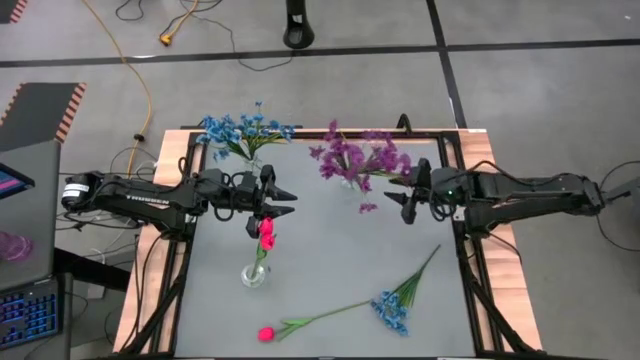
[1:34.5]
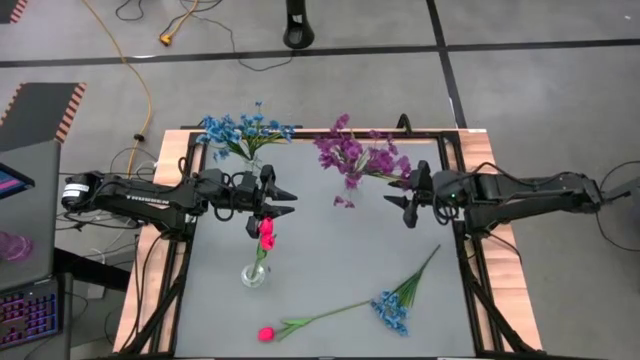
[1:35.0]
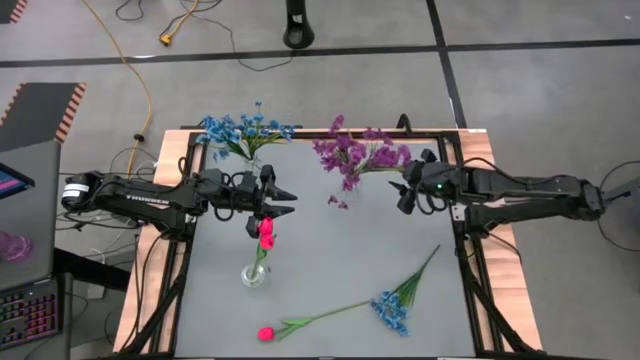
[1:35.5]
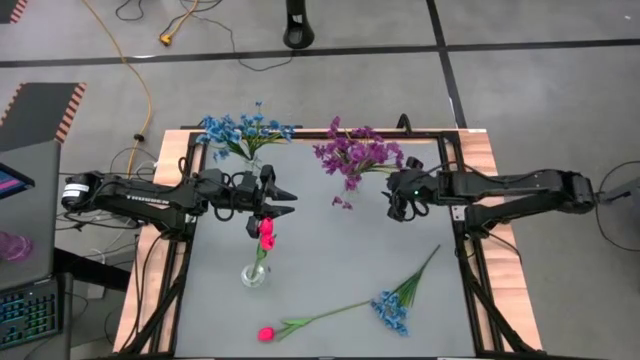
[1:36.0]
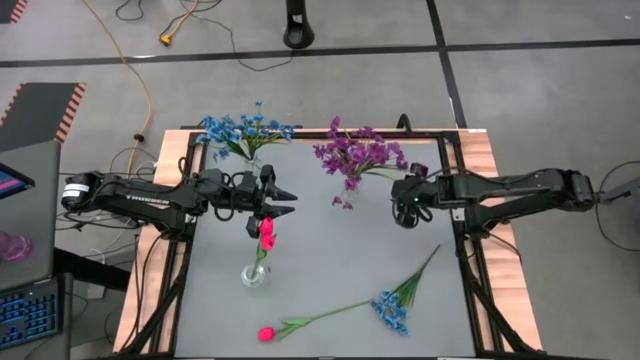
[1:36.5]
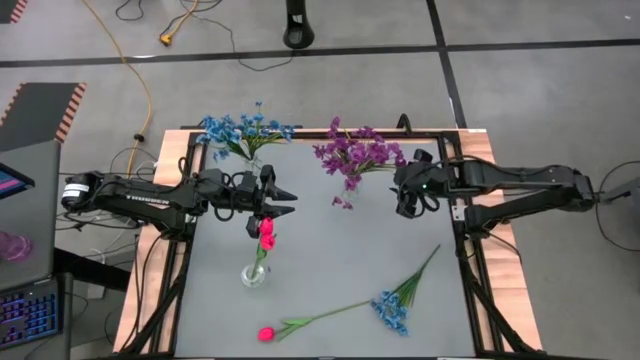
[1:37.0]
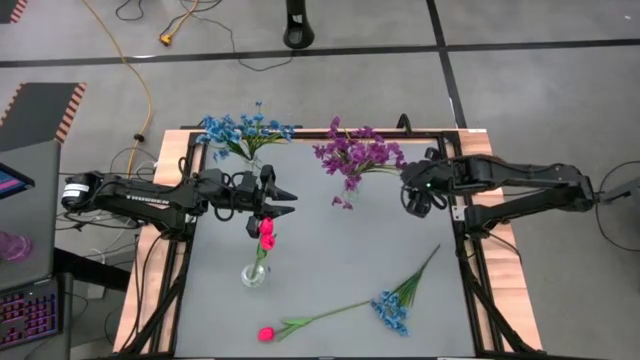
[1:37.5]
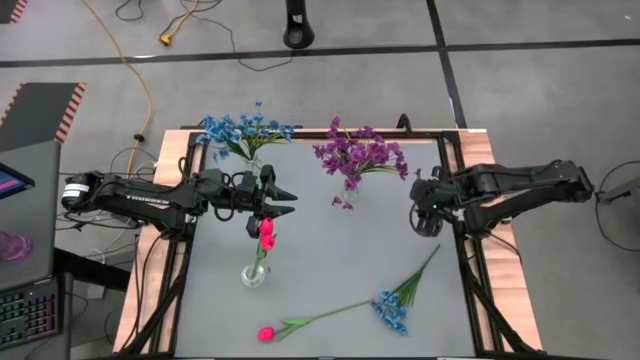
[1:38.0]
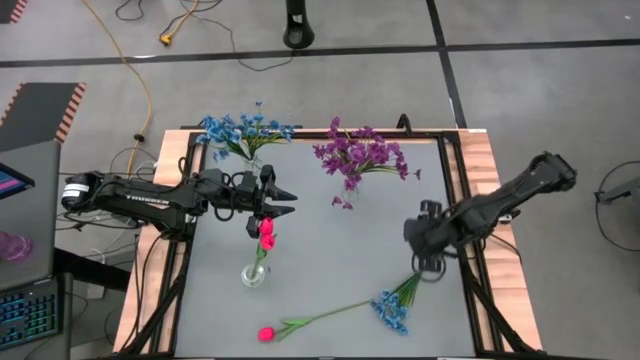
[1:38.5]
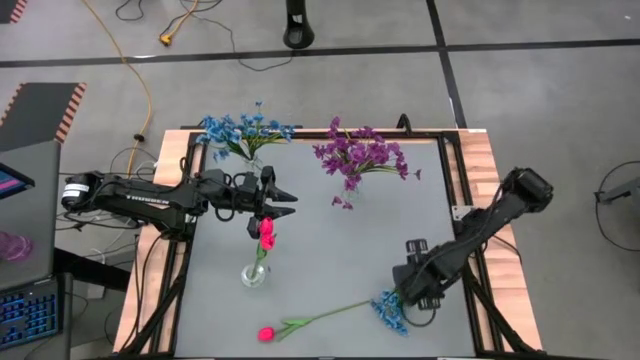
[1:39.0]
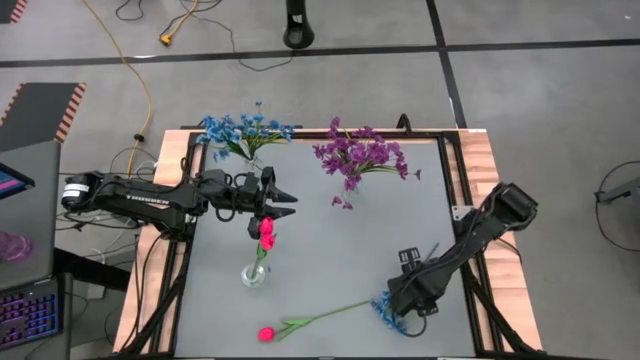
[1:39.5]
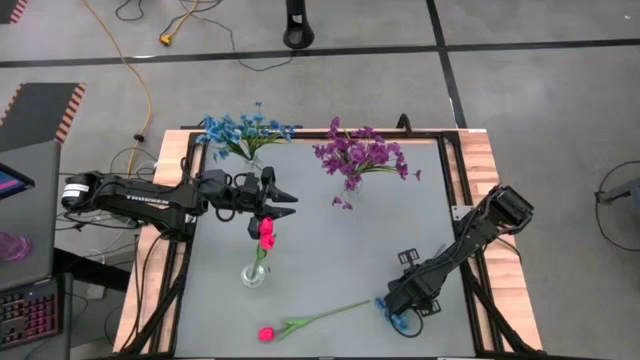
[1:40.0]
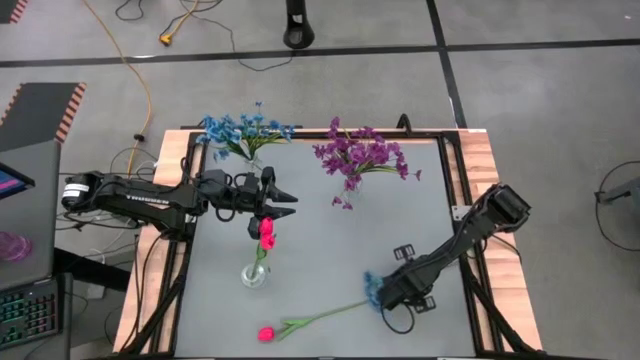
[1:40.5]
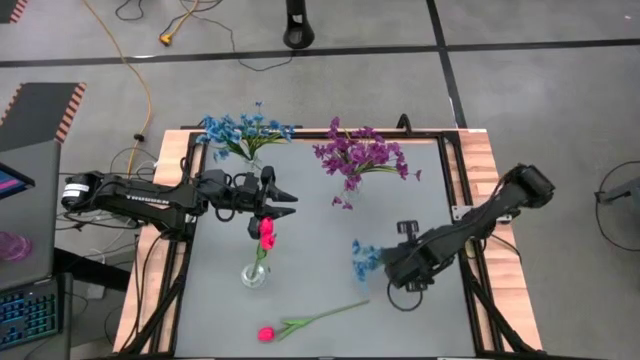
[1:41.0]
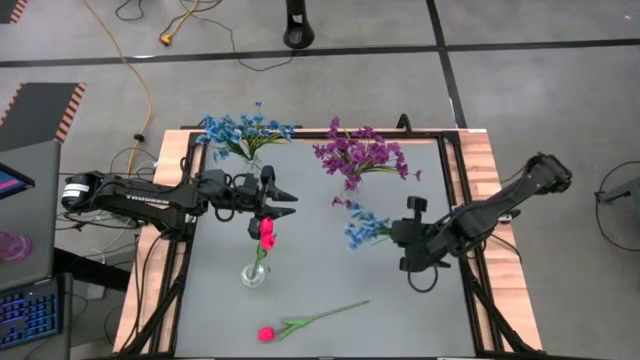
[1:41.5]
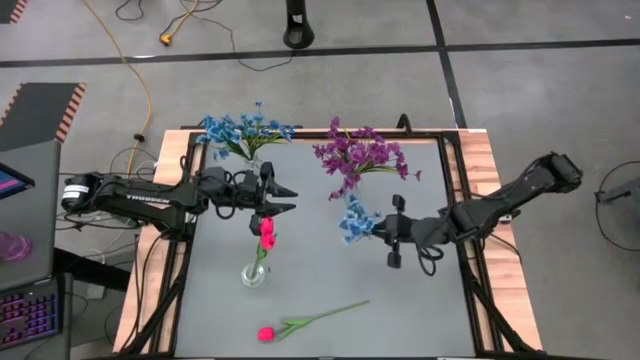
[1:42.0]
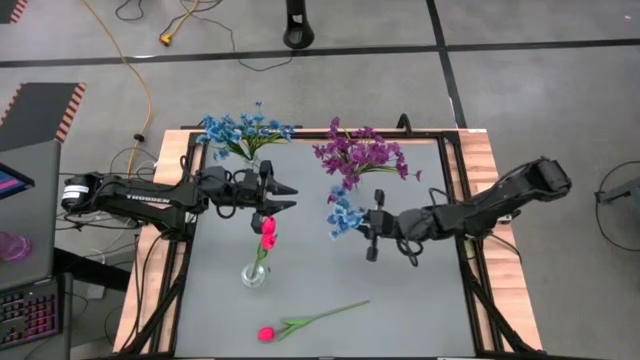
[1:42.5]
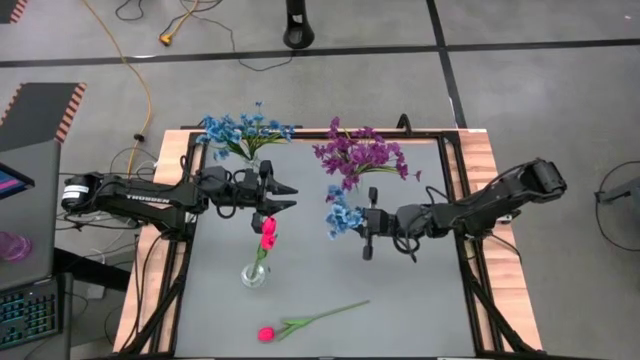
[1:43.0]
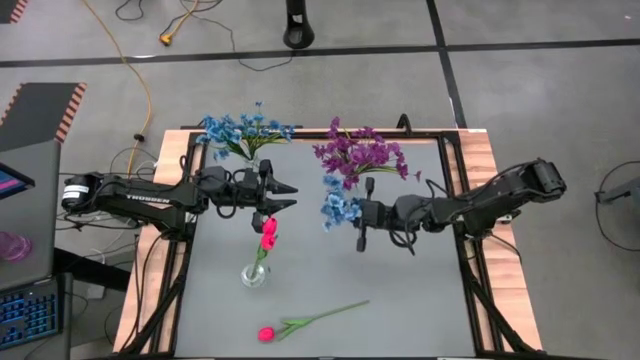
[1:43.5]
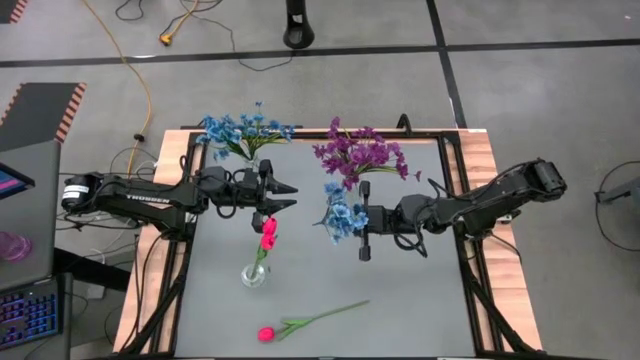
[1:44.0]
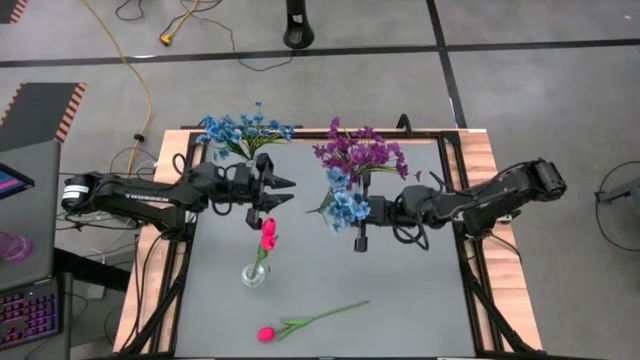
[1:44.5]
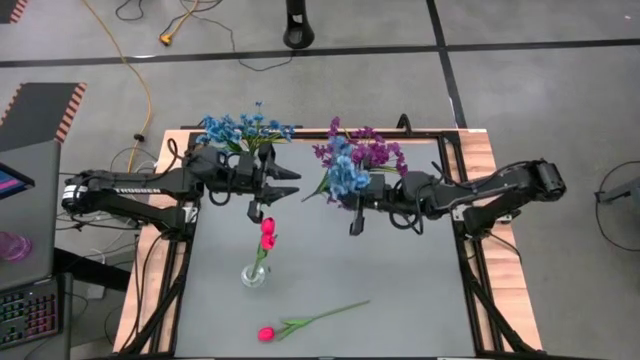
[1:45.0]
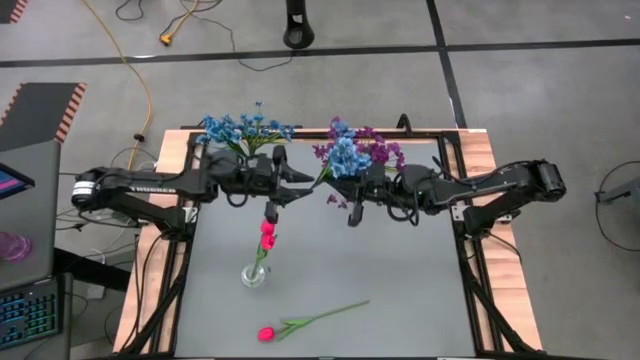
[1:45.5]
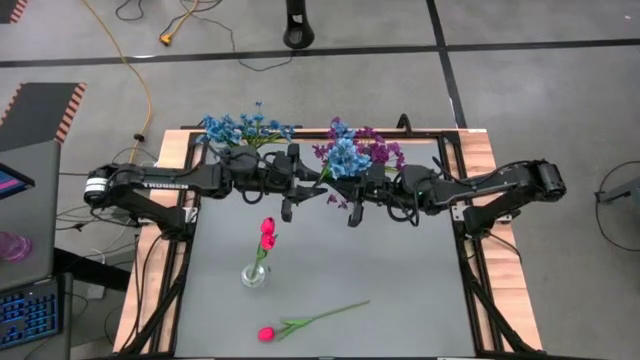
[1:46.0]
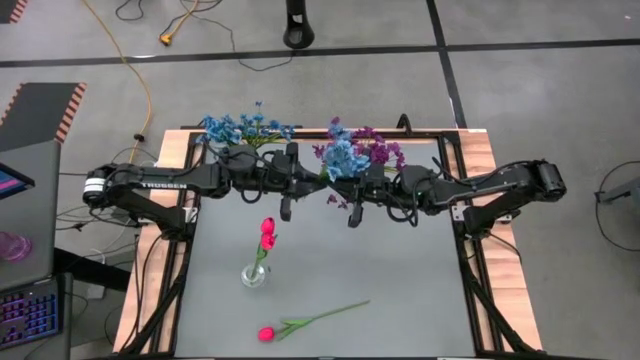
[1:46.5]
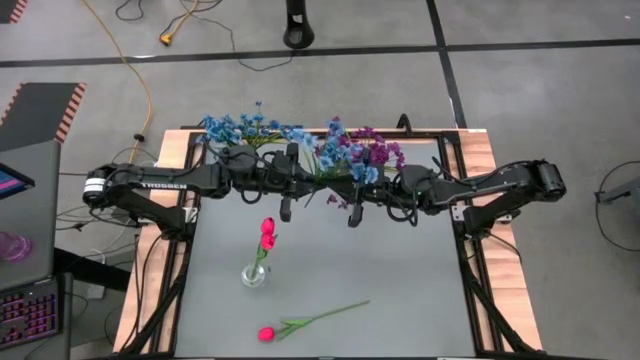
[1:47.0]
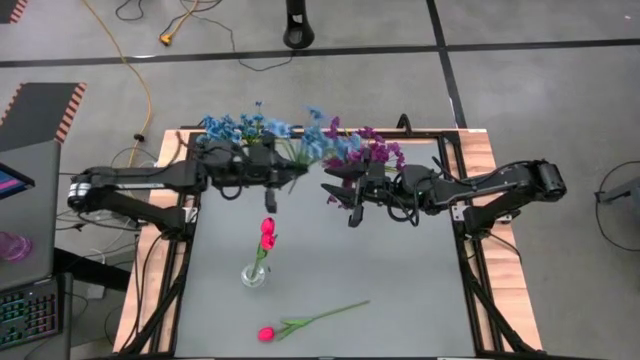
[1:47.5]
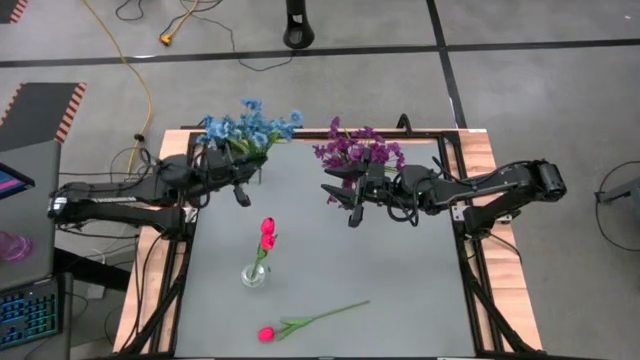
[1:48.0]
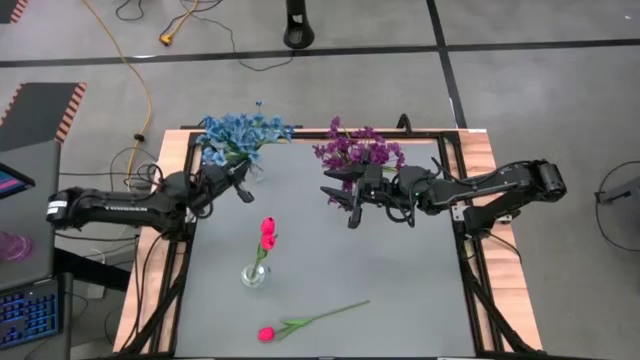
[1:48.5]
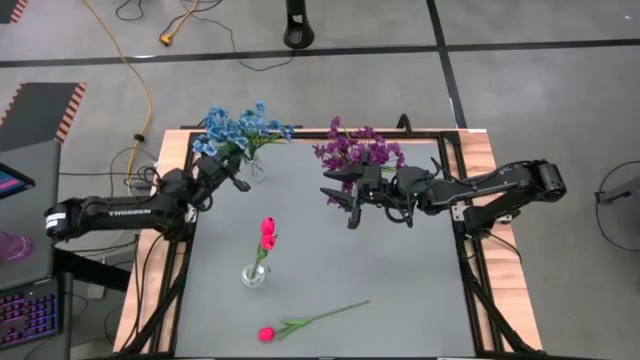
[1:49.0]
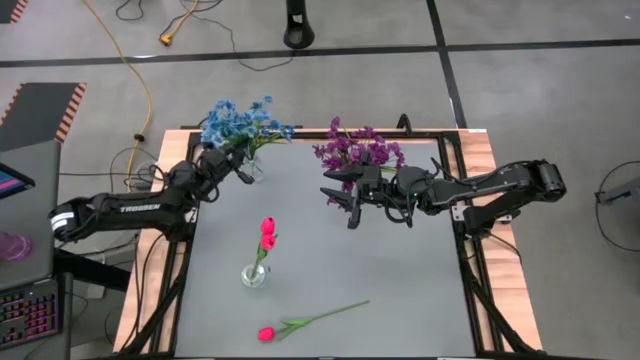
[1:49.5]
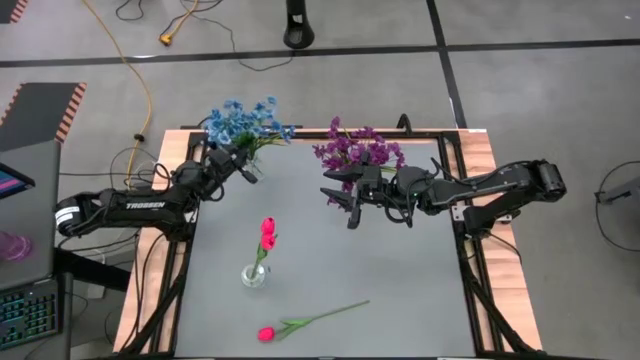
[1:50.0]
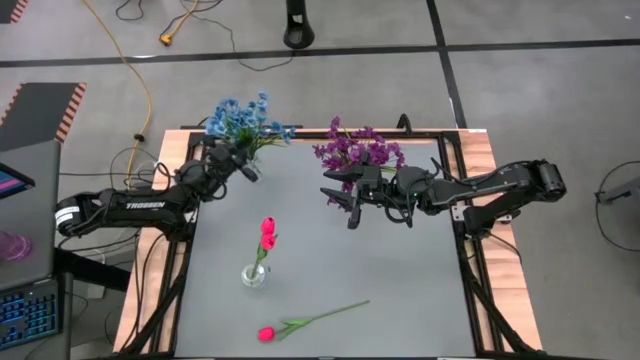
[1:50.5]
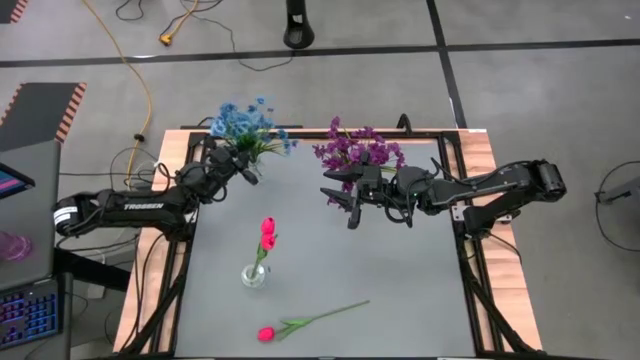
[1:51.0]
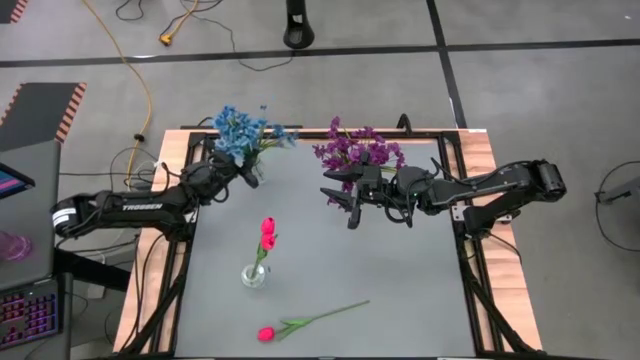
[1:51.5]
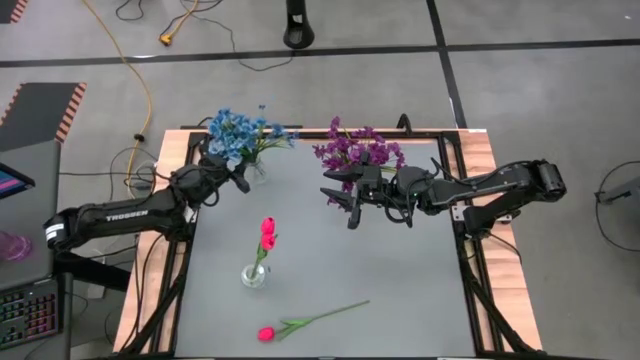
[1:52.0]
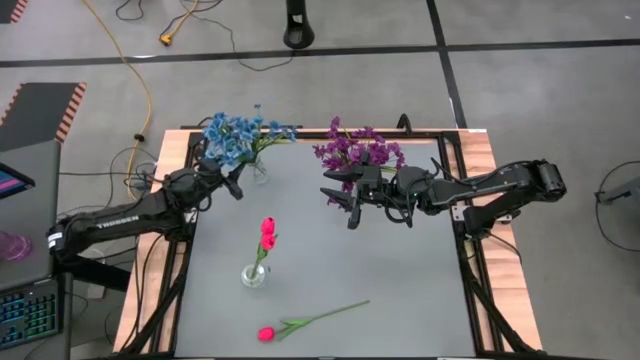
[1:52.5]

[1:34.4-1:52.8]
Task: Sort flowers into vase by color
Put the blue flower into the top left transparent vase

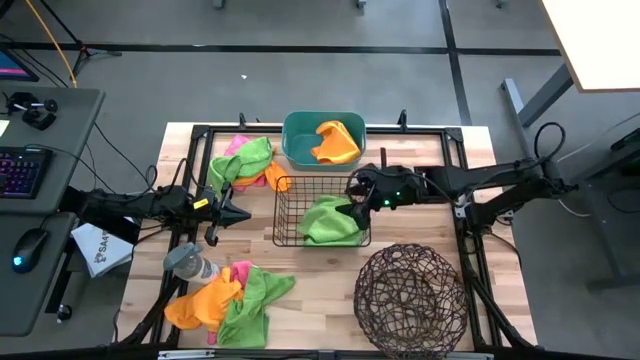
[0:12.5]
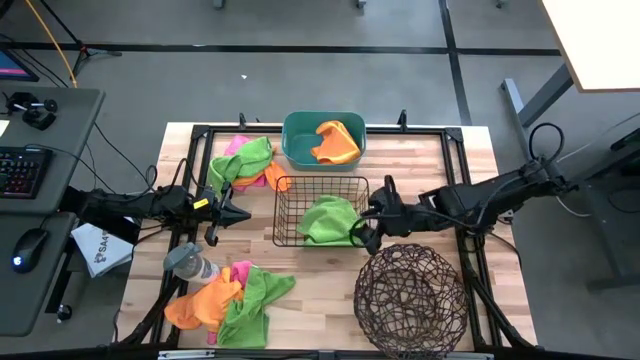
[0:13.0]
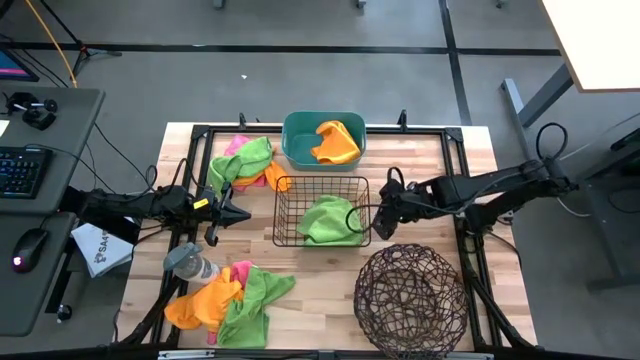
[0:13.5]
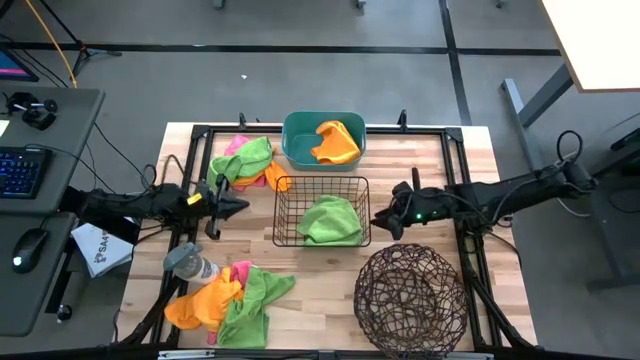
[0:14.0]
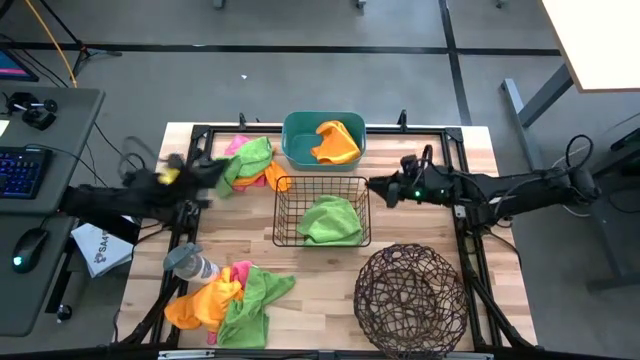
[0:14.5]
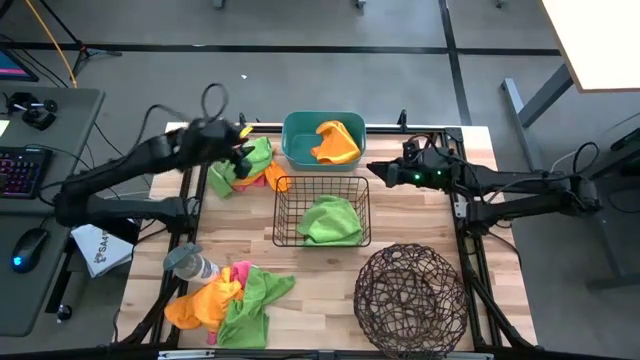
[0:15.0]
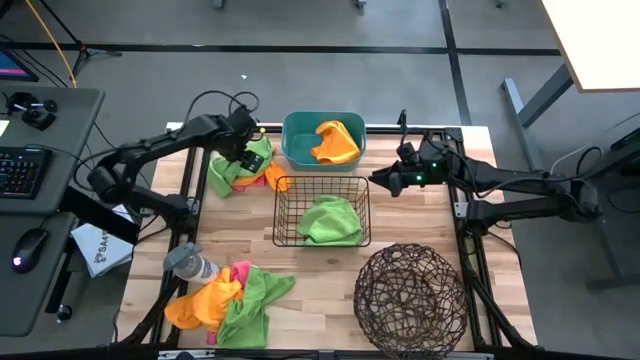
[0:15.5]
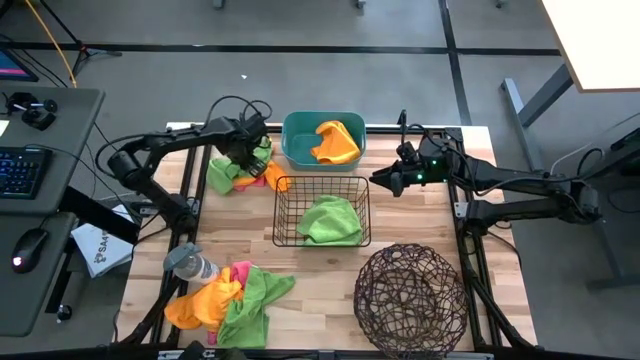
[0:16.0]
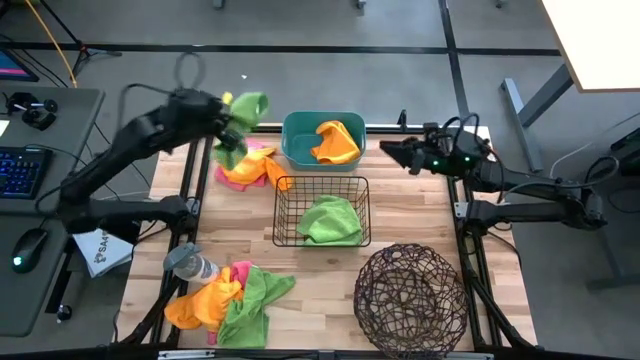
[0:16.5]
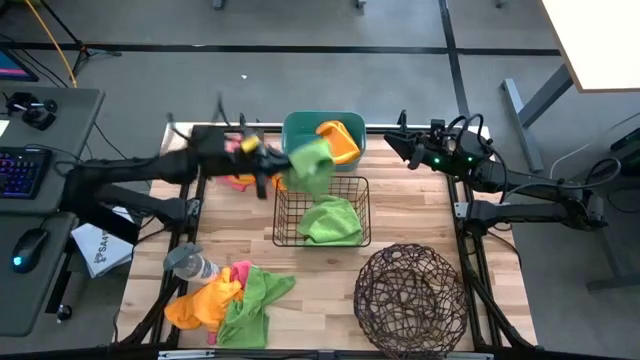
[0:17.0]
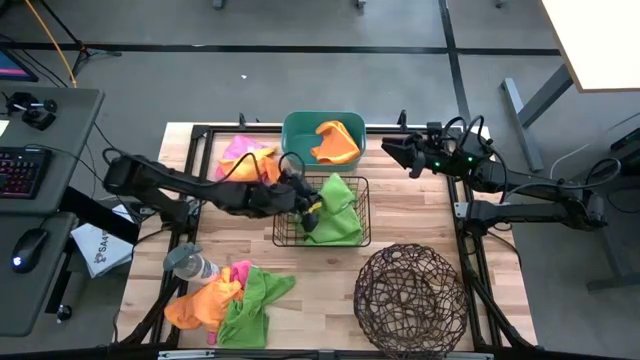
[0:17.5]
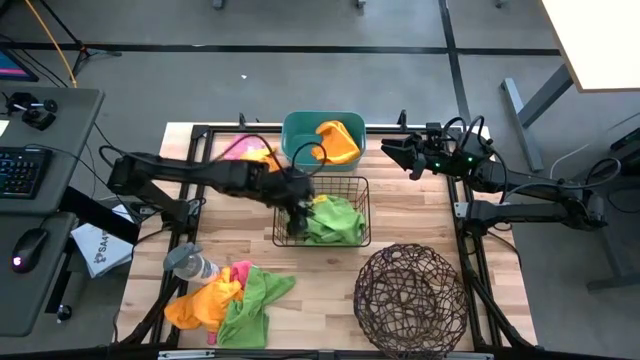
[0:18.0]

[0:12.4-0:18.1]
Task: Sort microfiber towel by color & place in baskets
Put the top green microfiber cloth into the black wire basket
